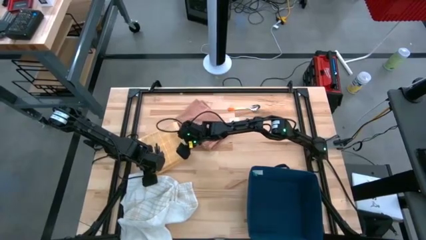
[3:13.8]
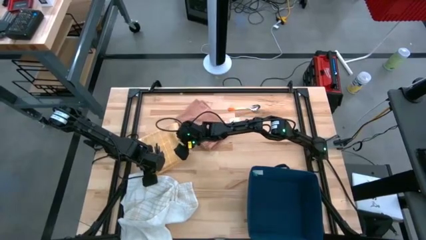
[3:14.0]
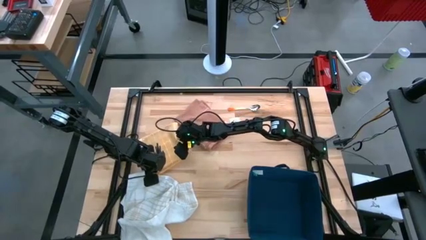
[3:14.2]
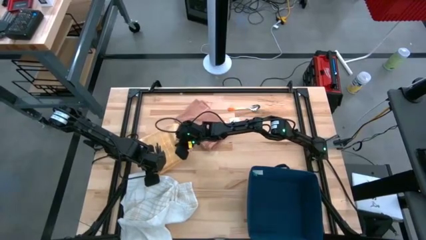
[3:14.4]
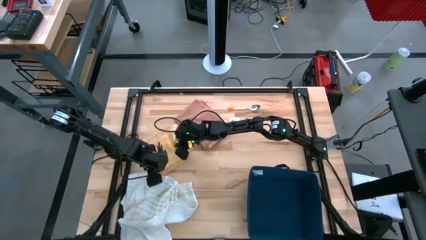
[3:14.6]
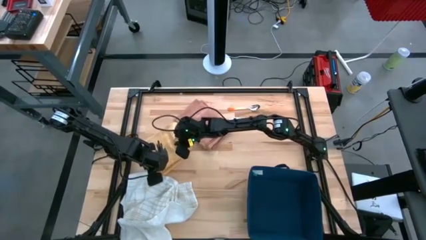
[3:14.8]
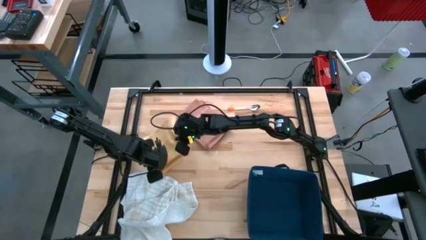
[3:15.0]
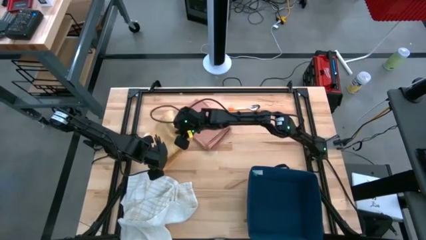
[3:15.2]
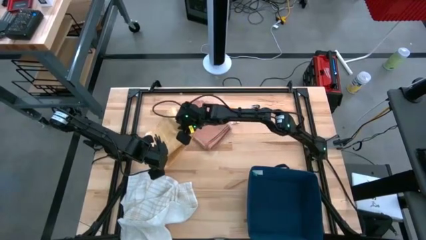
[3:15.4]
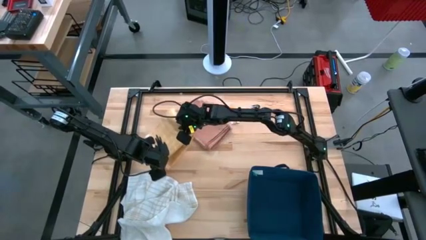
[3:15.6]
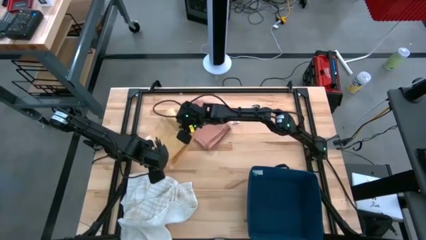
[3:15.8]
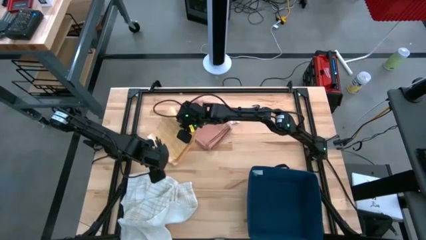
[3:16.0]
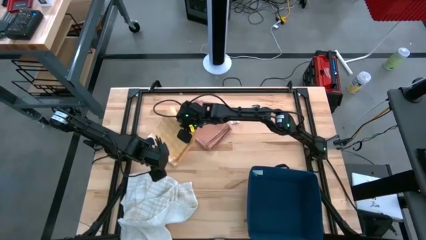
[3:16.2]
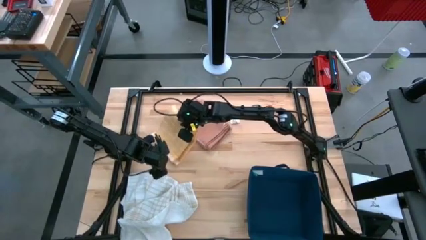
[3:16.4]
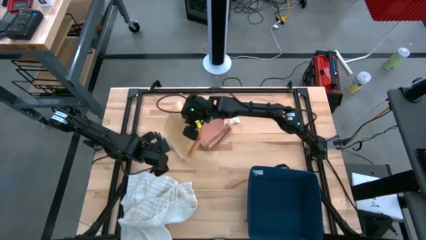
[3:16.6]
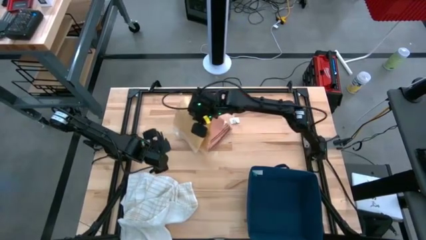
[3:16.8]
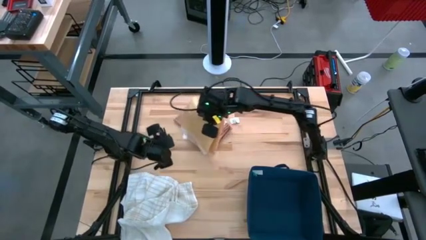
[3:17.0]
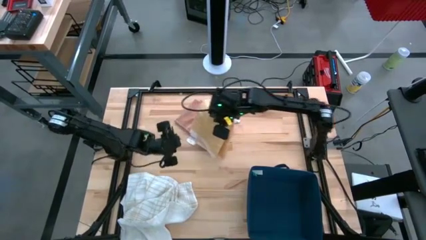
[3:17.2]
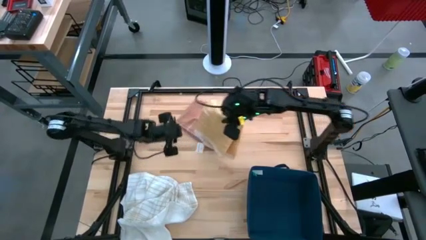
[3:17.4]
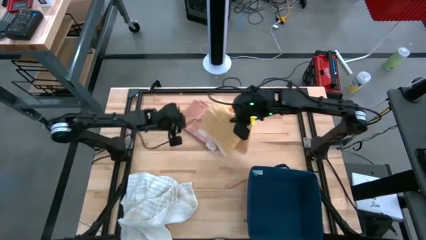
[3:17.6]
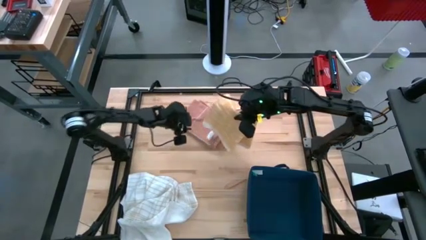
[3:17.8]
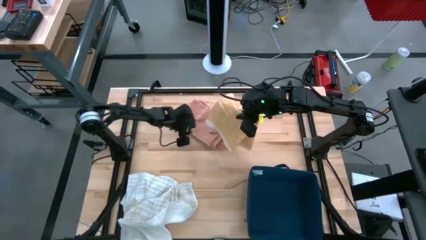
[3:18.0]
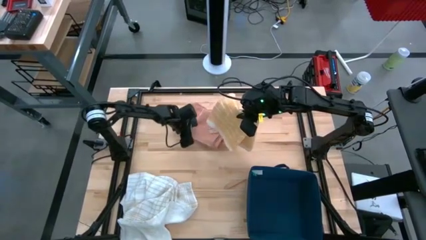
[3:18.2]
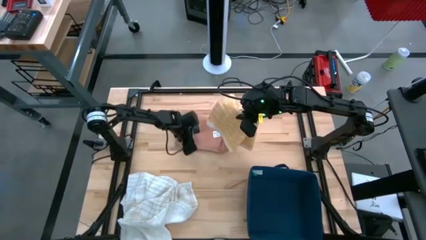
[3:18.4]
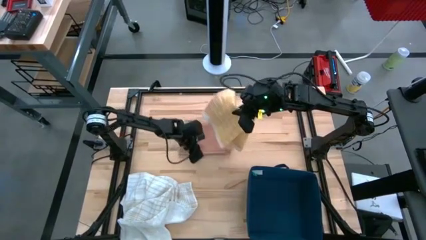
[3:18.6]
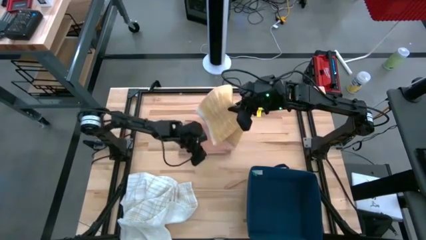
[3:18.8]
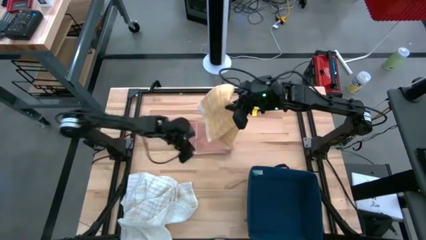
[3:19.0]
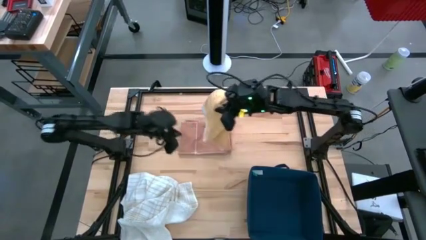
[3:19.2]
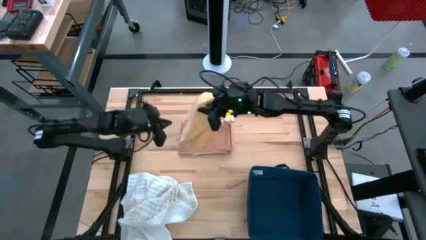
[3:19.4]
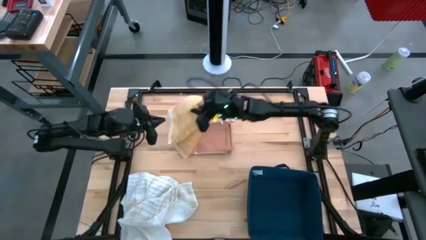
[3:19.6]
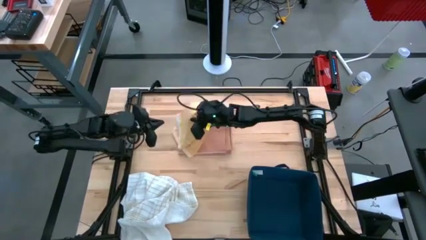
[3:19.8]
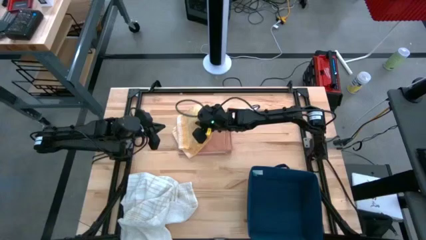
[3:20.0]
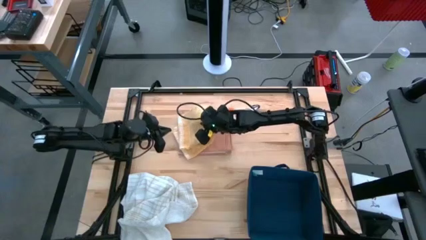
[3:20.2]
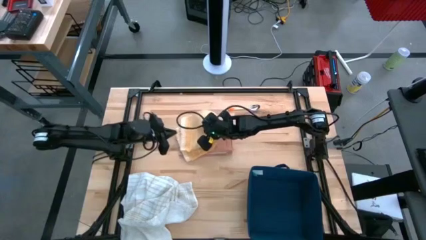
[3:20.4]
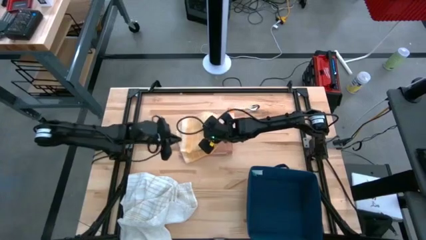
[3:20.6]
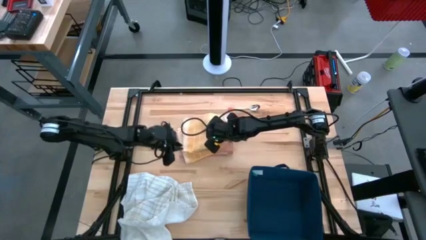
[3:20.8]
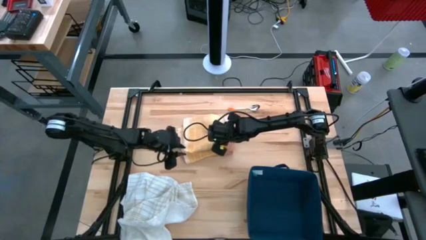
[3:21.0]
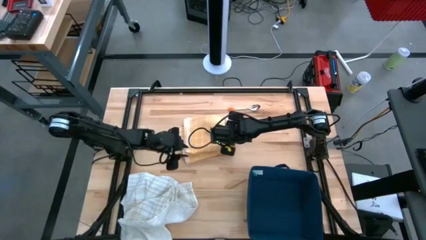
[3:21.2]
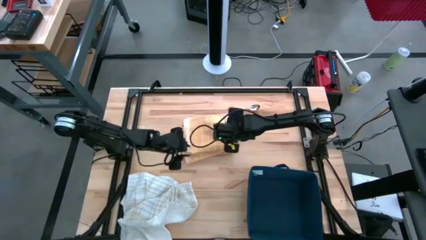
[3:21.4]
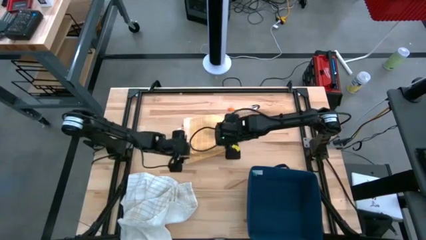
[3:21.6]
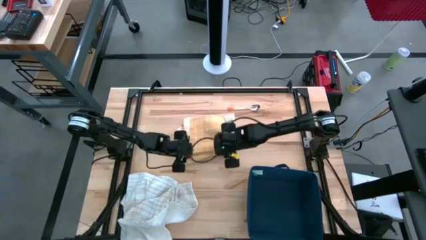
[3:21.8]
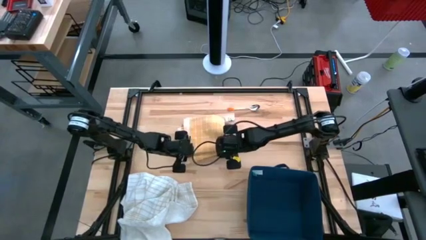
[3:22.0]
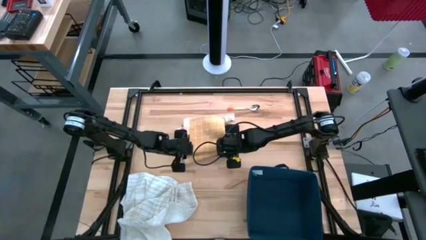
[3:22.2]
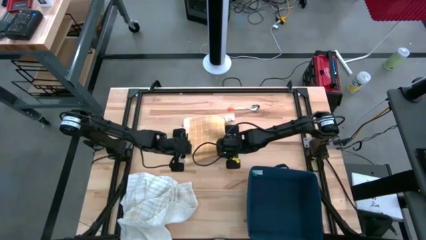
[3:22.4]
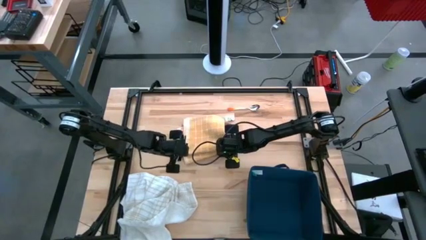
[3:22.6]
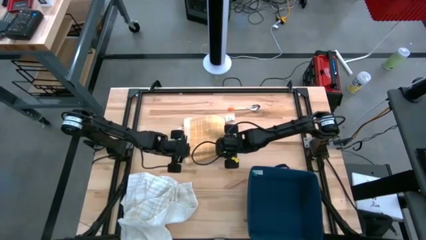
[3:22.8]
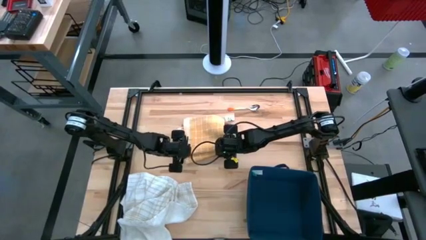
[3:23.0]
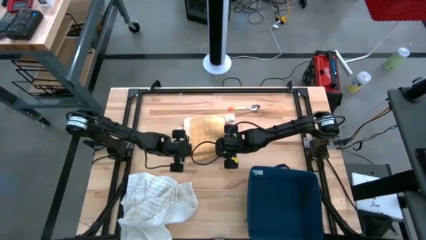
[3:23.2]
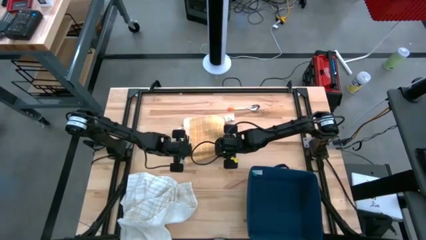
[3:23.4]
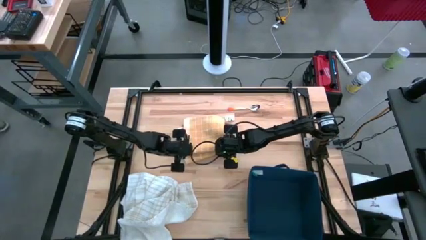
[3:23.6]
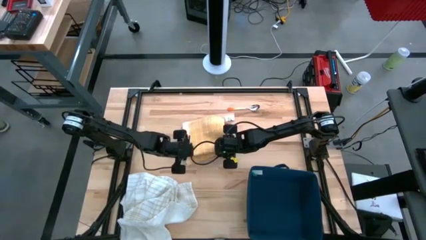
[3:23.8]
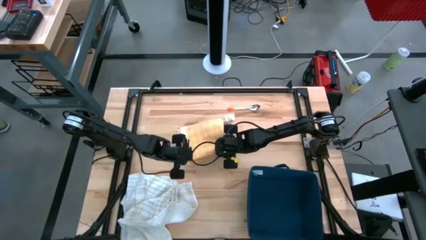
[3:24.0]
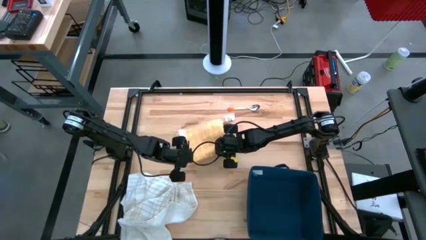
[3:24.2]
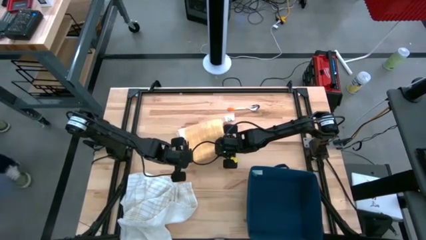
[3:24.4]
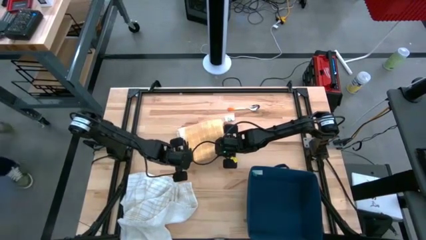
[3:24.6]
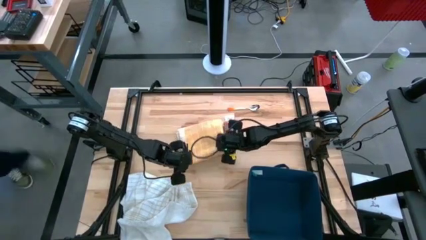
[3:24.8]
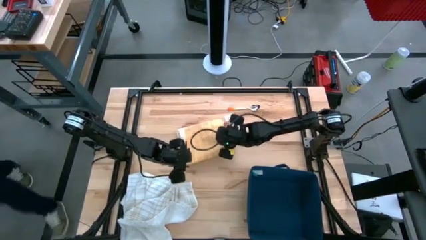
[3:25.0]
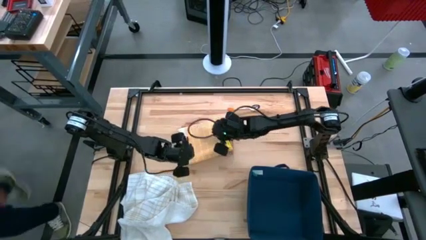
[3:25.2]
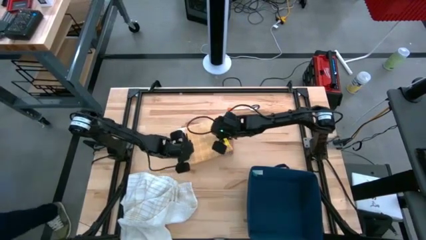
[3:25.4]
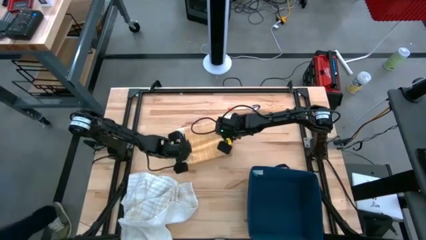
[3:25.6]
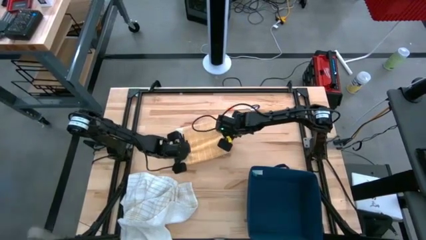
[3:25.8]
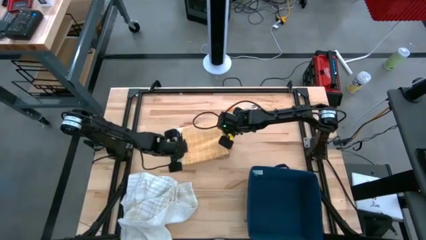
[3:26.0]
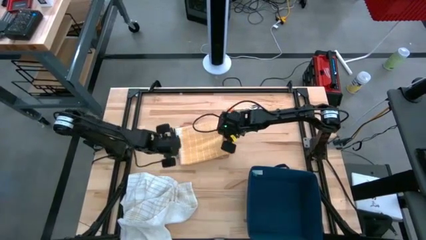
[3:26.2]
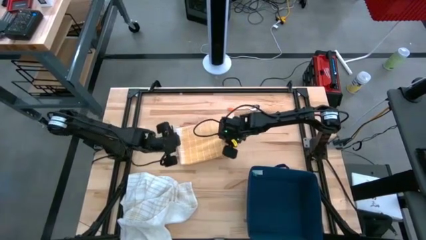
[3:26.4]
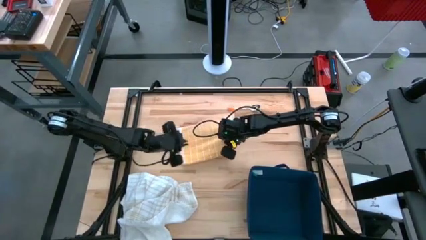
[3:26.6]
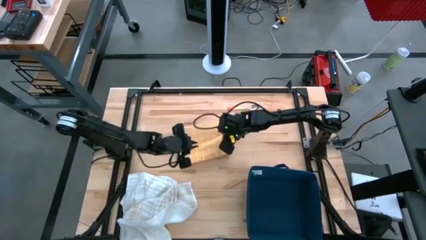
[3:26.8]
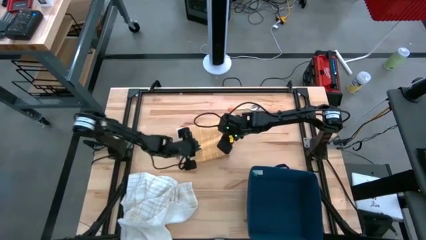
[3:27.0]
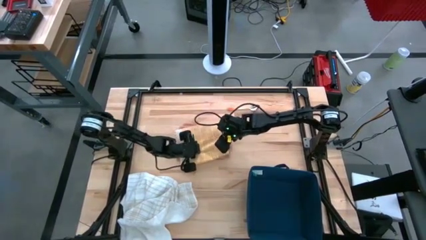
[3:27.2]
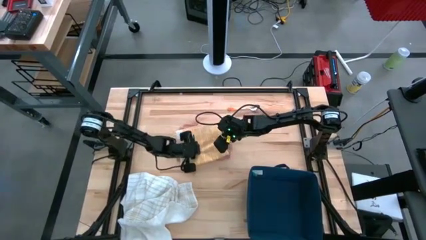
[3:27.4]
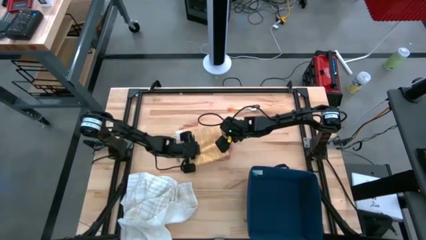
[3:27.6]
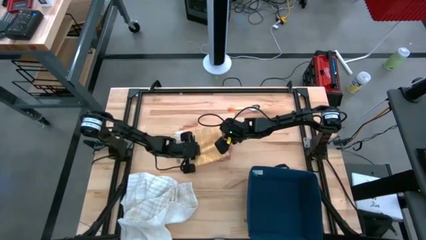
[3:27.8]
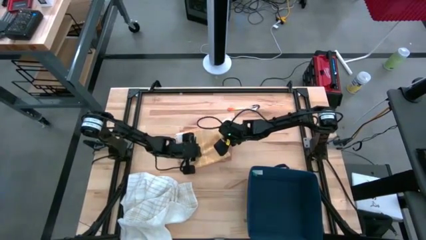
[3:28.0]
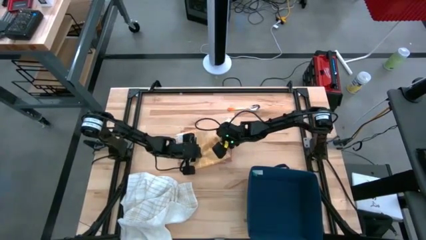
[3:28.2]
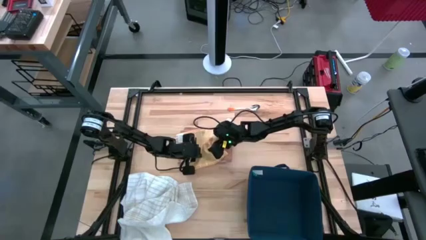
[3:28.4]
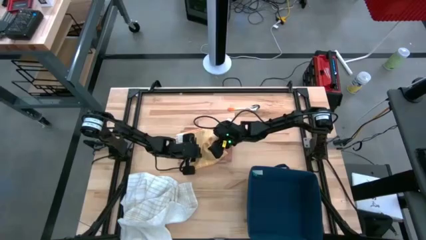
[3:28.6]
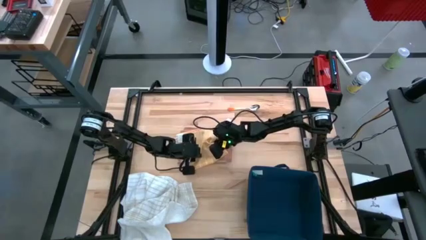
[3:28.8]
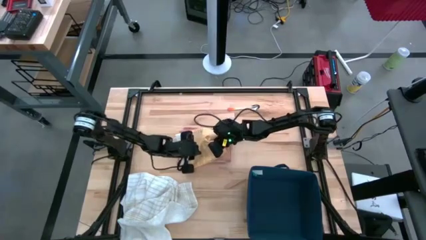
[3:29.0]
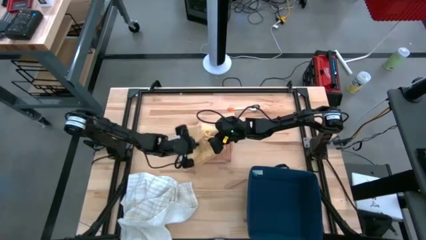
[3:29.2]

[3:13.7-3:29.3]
Task: Fold towel
Stack the folded yellow towel on top of the folded brown towel
